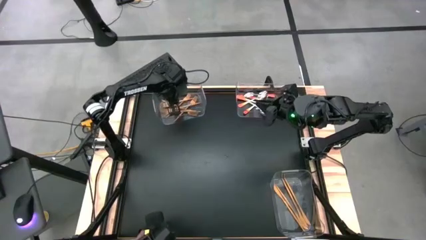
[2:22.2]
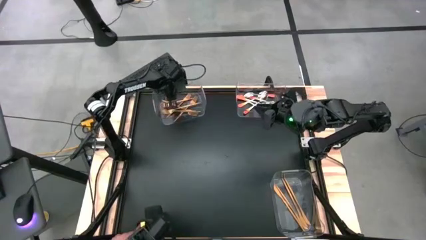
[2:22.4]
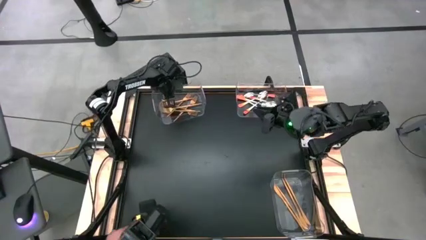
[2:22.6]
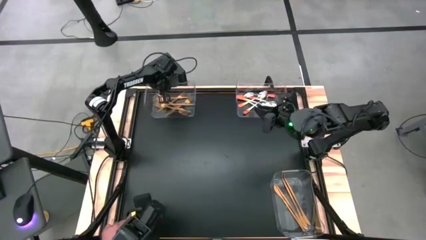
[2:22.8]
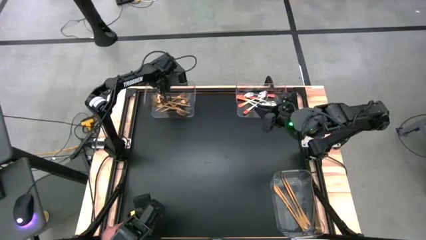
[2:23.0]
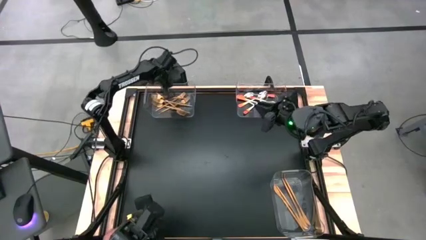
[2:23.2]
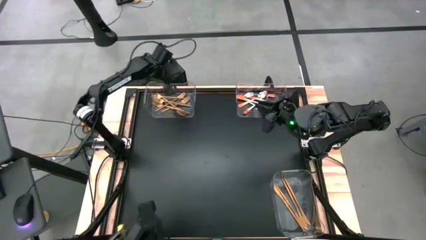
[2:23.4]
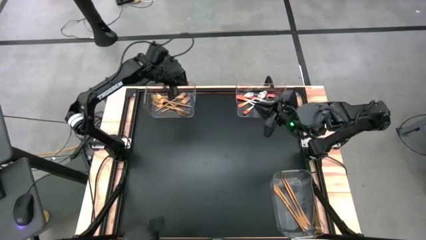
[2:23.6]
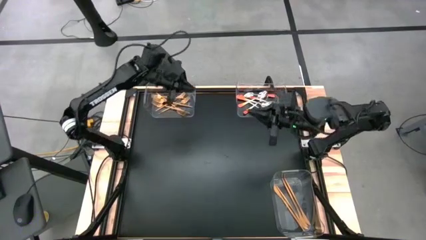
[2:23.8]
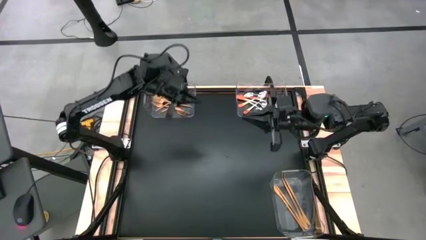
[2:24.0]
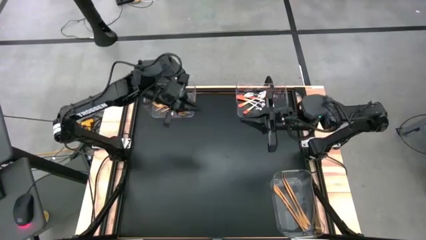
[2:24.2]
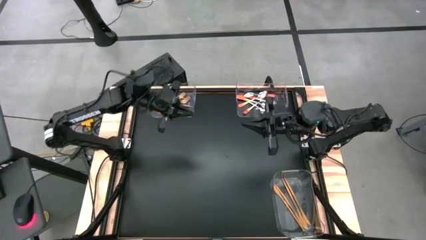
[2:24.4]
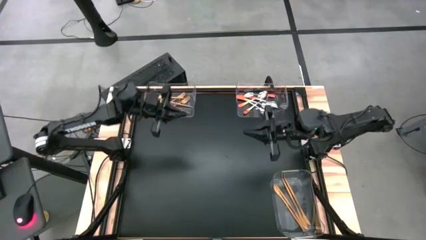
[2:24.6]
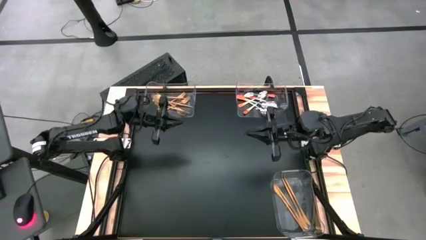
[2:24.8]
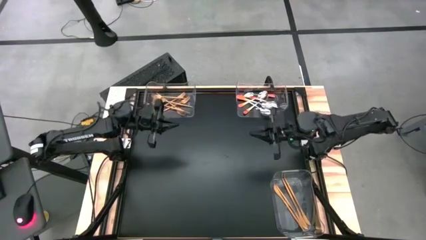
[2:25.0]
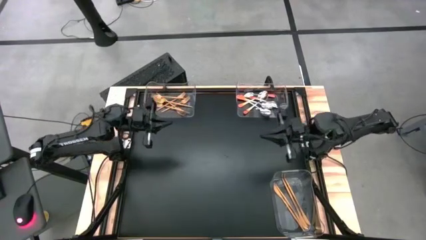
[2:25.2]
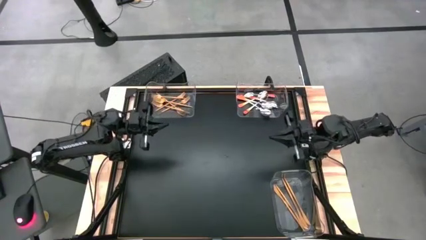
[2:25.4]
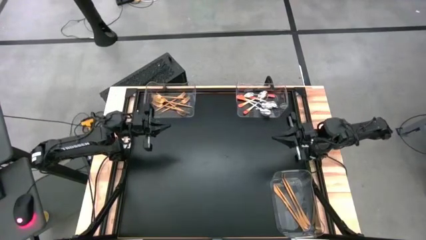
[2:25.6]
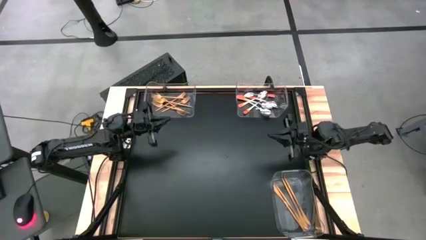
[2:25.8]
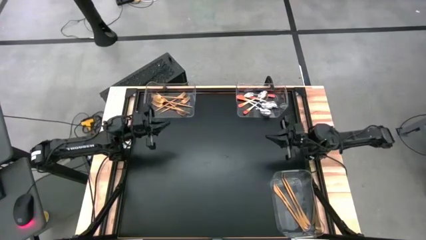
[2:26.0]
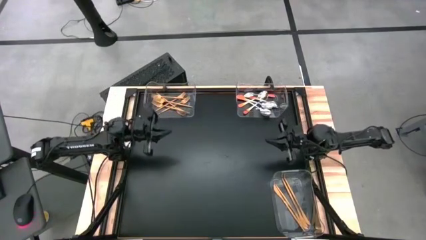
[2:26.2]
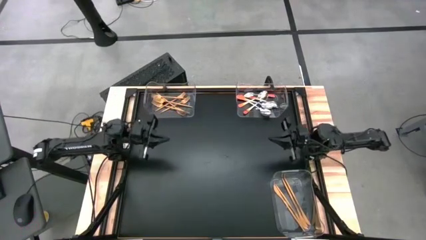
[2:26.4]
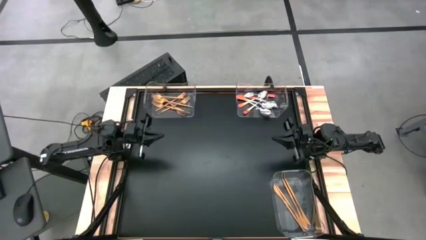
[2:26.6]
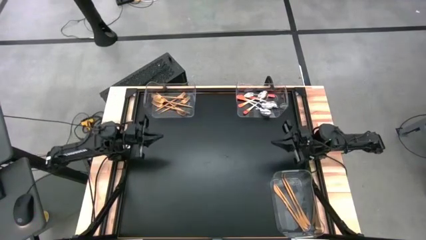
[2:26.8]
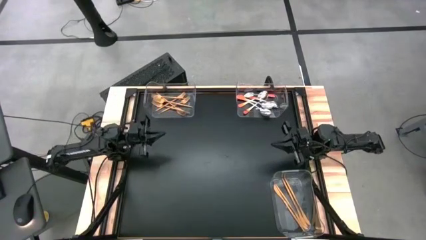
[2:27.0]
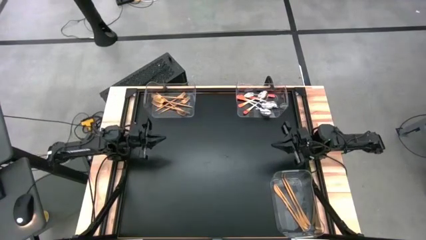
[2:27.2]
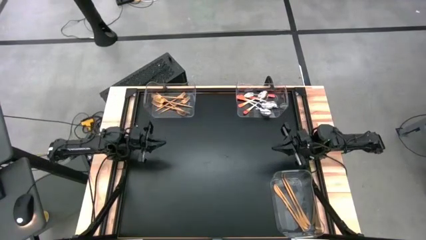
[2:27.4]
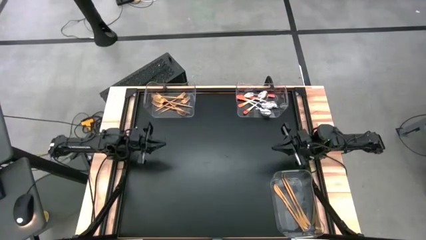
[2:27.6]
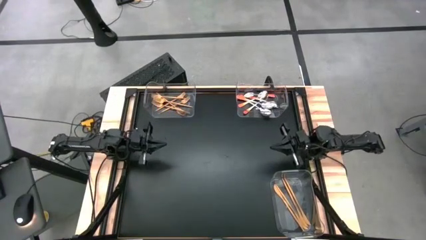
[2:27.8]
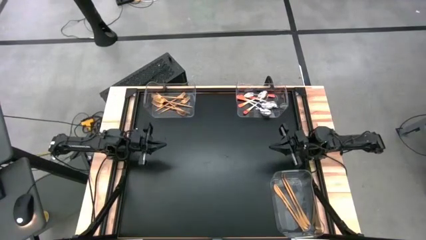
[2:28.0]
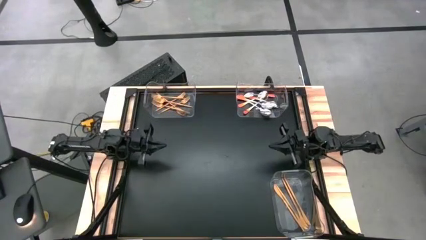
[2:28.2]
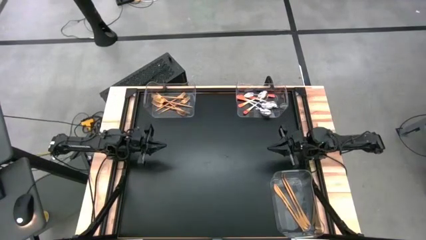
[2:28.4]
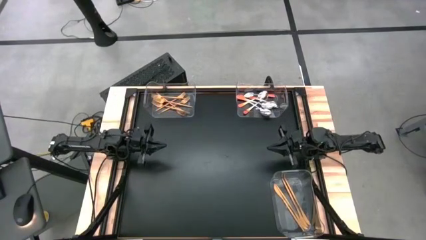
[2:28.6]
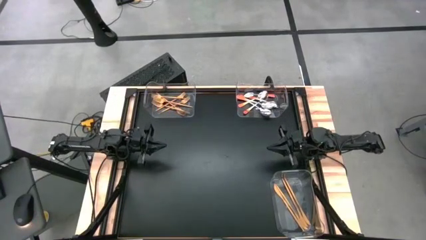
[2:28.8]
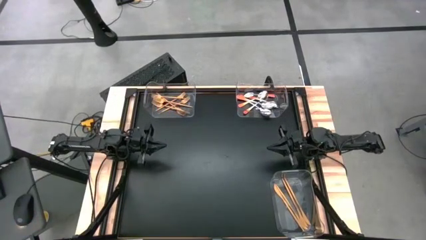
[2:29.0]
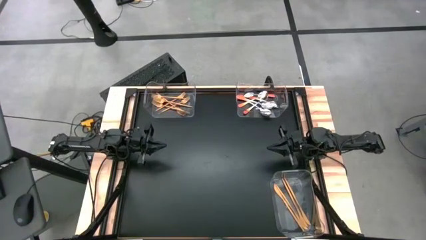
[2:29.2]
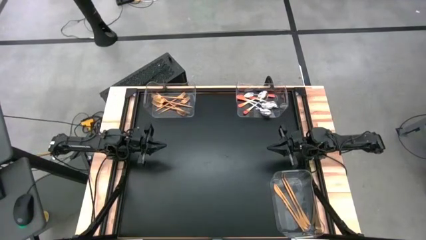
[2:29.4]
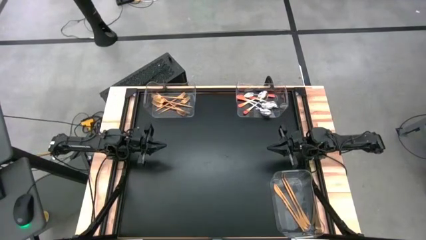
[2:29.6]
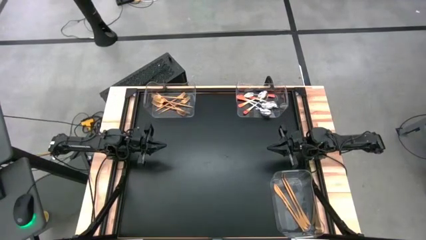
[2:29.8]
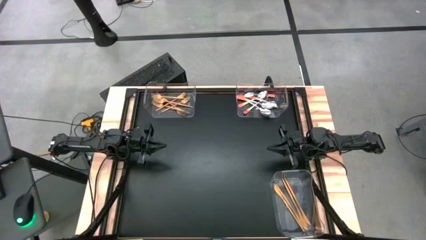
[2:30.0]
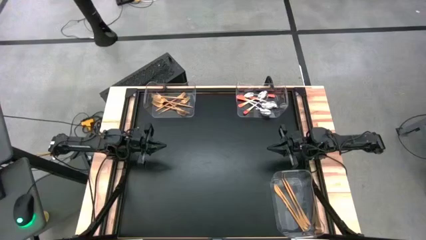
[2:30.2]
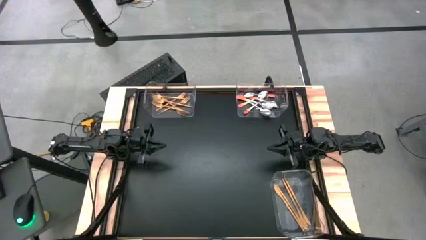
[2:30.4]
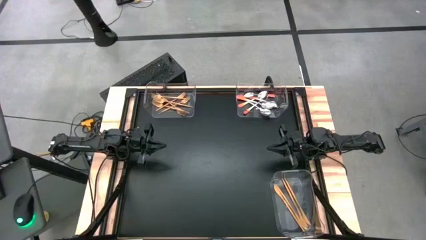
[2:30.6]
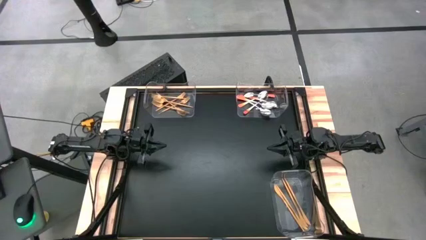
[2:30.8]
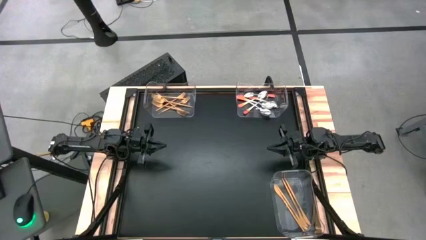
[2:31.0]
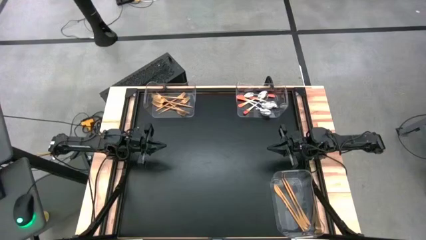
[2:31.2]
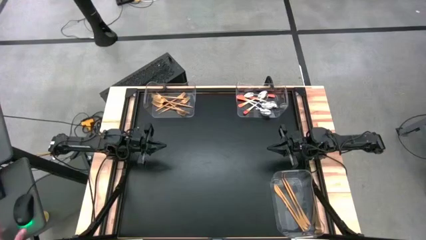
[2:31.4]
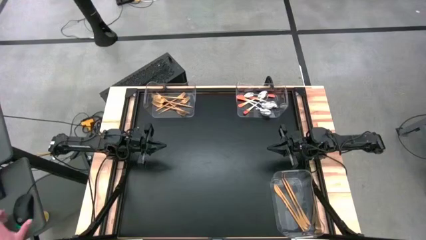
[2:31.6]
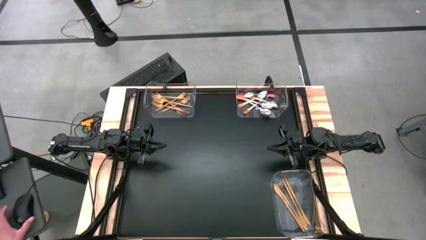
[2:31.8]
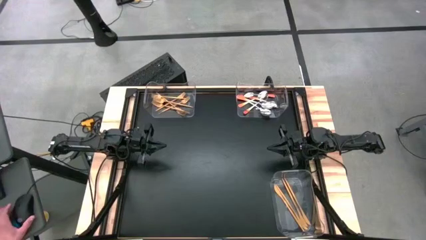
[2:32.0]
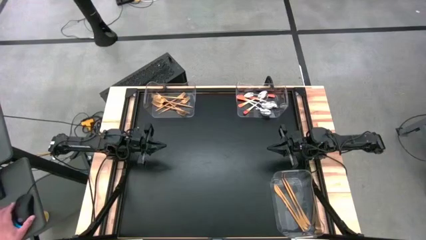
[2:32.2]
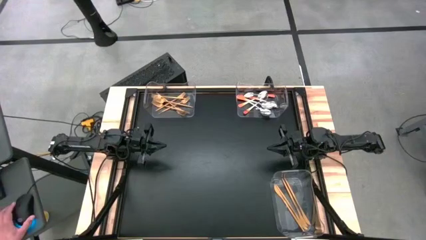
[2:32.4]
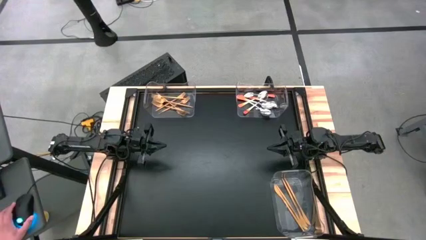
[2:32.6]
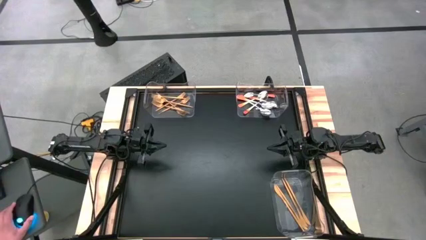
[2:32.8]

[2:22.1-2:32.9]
Task: Sort silverware by color (type)
Return to Home Position

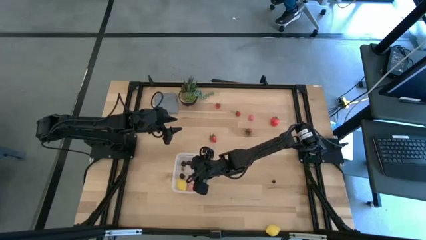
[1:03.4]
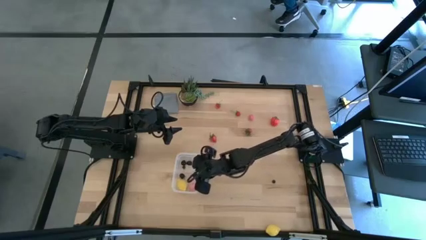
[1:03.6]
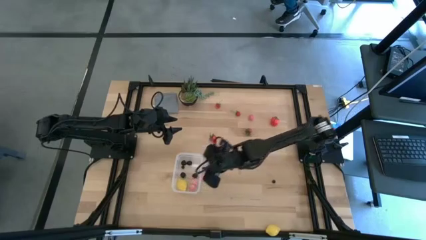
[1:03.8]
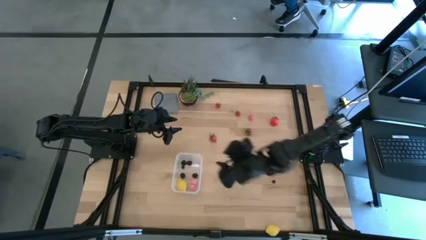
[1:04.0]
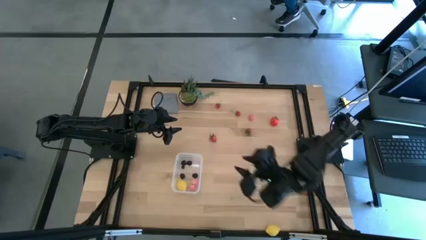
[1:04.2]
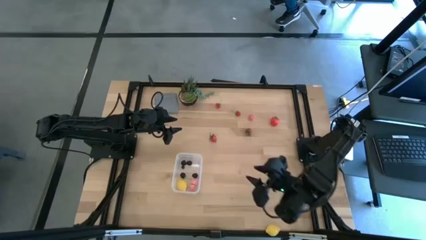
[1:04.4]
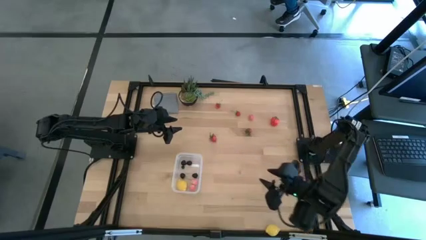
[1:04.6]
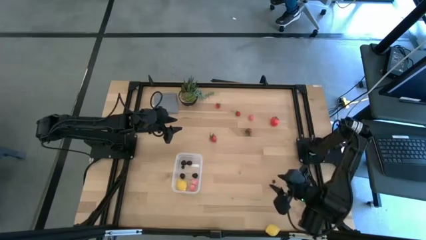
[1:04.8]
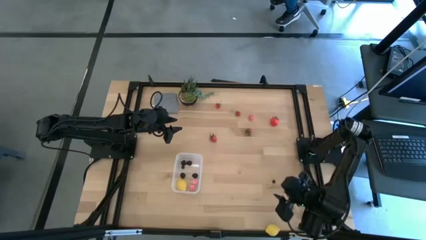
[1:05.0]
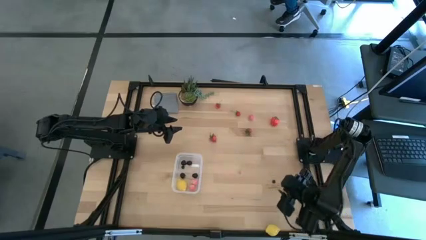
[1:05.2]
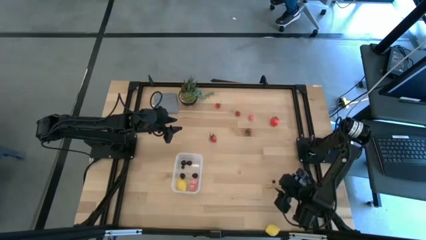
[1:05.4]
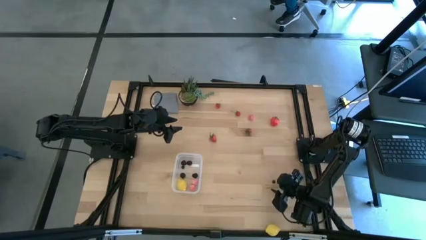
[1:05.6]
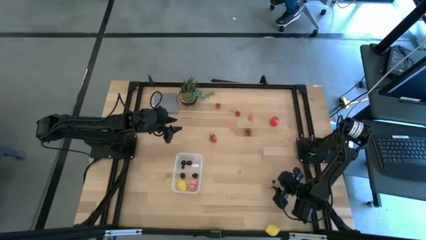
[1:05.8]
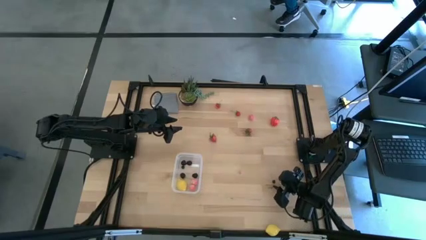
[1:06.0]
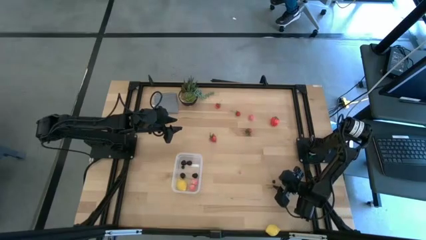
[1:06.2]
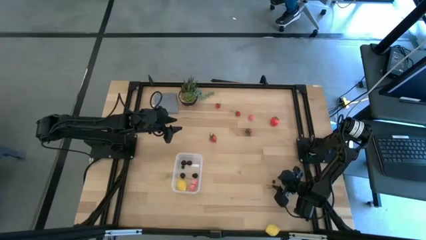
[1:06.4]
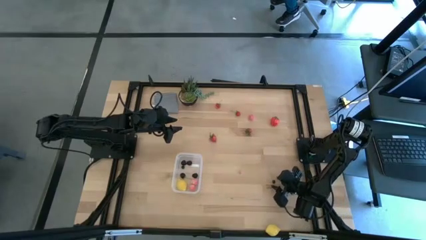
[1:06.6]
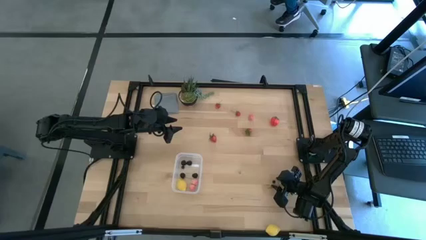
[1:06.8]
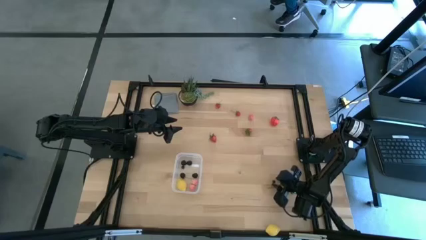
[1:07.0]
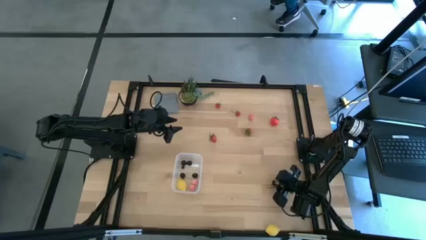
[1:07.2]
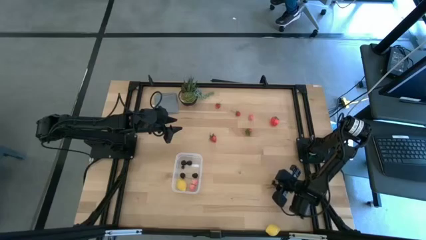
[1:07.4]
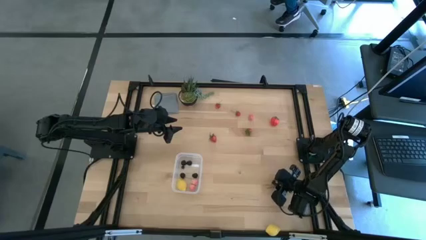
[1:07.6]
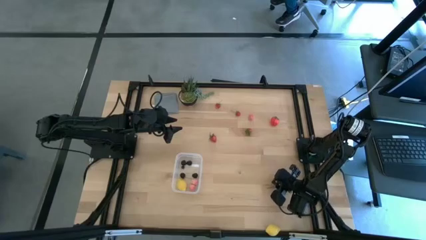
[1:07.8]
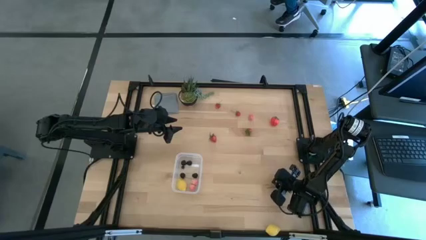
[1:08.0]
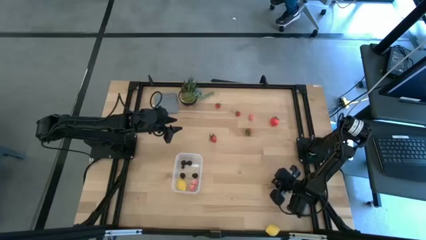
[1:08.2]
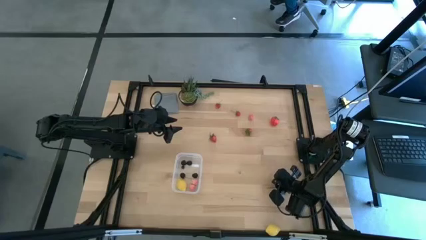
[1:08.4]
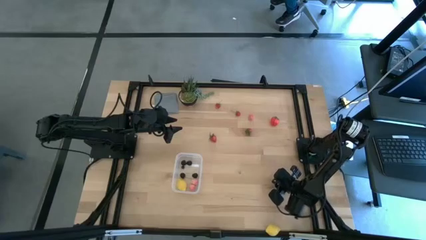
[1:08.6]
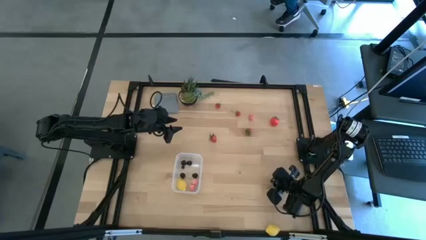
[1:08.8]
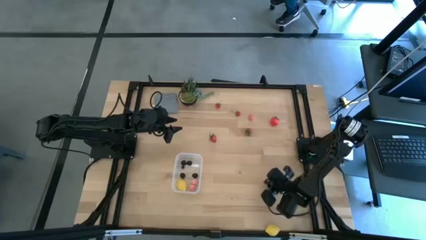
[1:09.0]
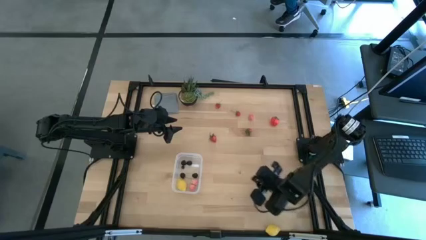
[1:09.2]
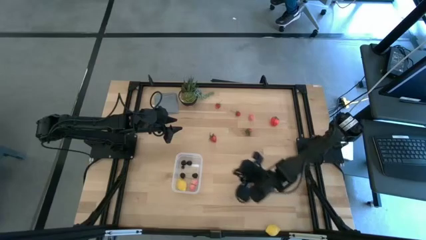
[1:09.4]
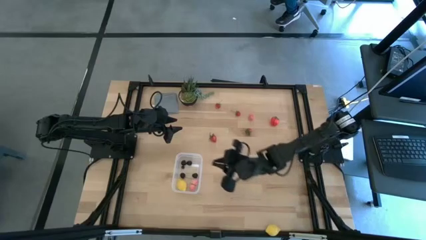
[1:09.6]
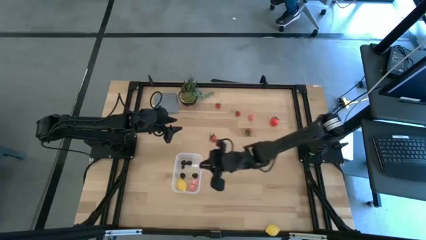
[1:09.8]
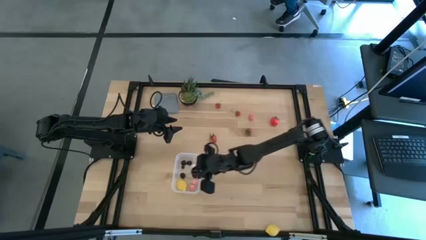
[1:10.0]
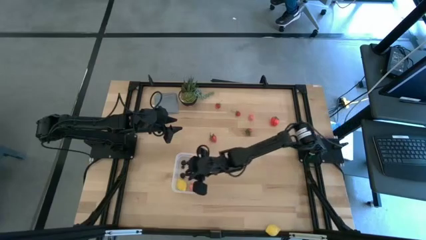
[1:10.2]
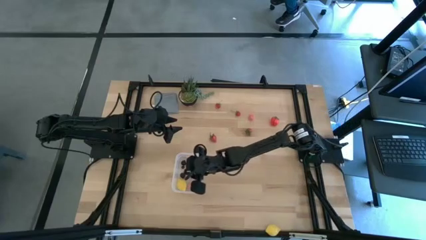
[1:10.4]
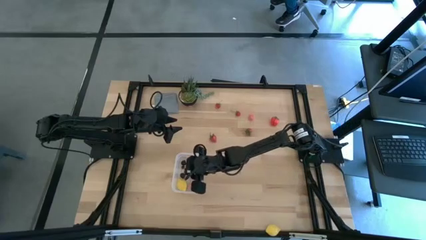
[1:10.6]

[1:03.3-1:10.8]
Task: Pick and placing Produce into tupperware
Put the blueberry into the transparent bin
